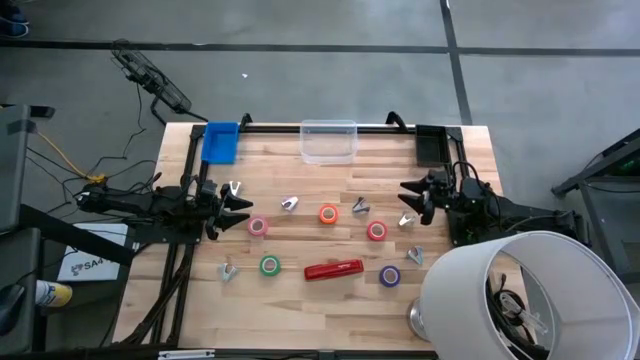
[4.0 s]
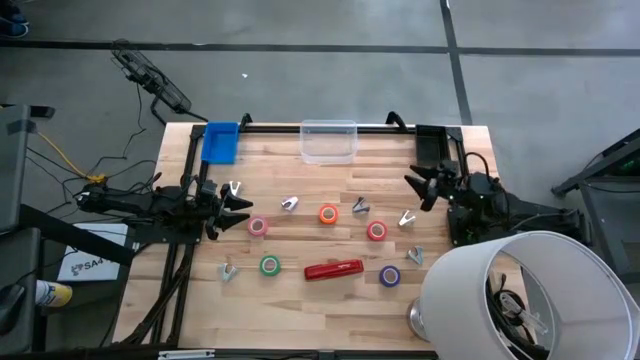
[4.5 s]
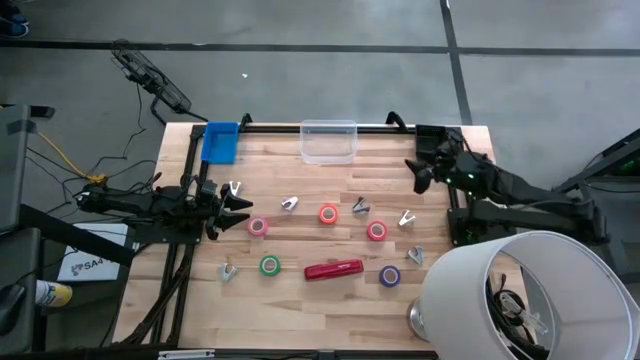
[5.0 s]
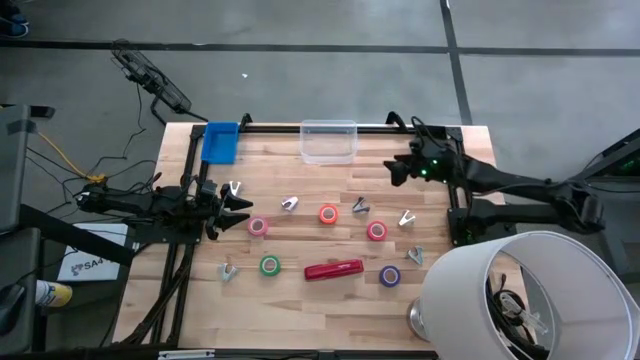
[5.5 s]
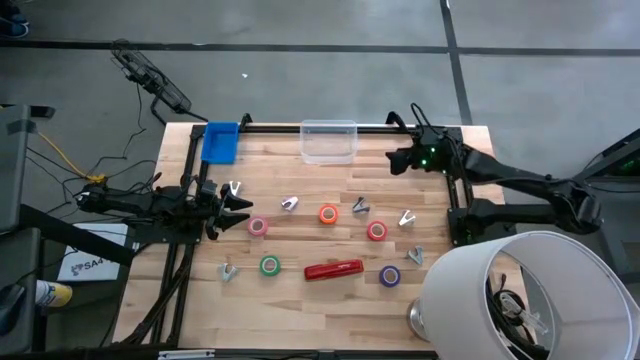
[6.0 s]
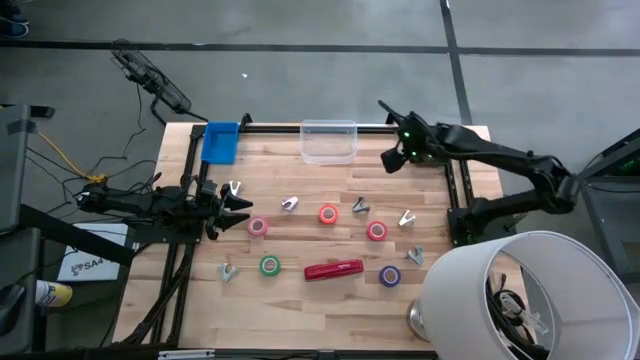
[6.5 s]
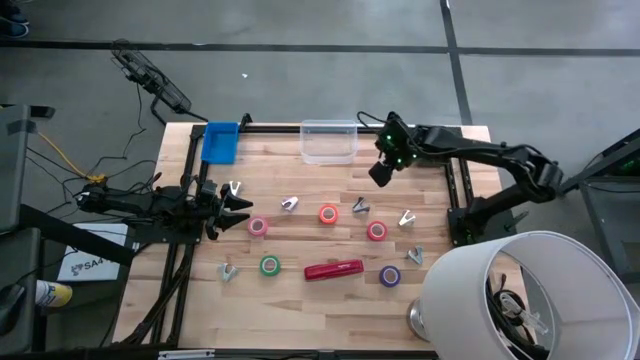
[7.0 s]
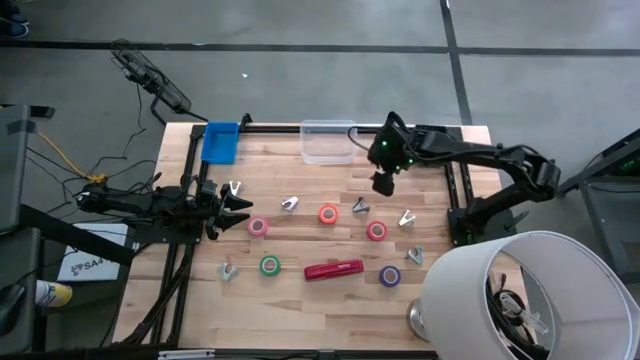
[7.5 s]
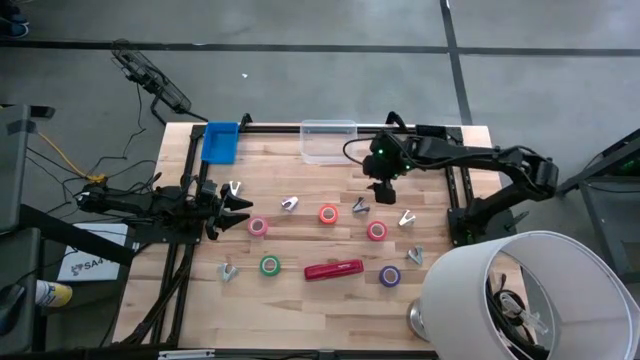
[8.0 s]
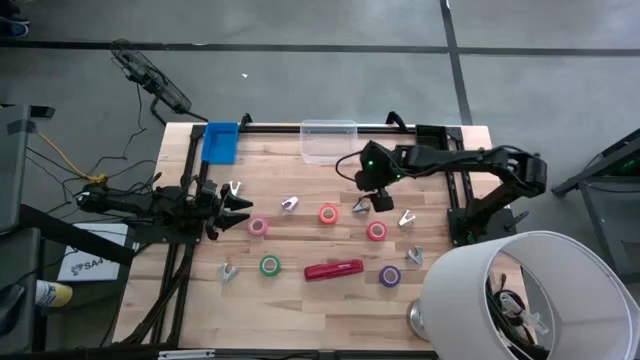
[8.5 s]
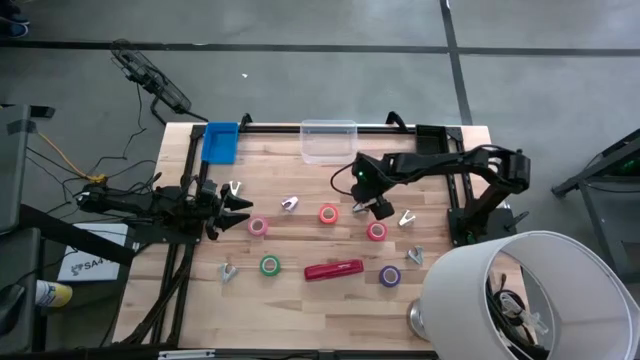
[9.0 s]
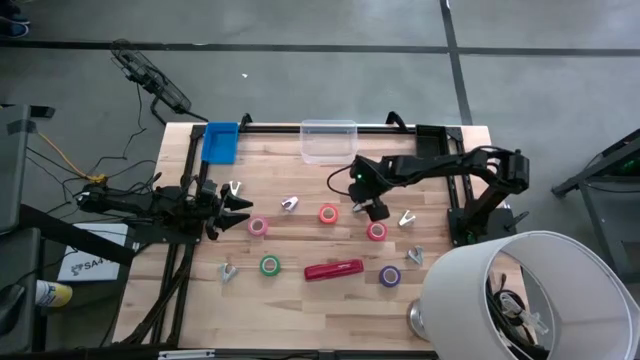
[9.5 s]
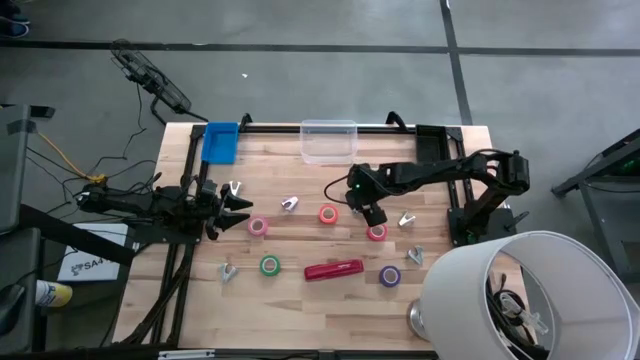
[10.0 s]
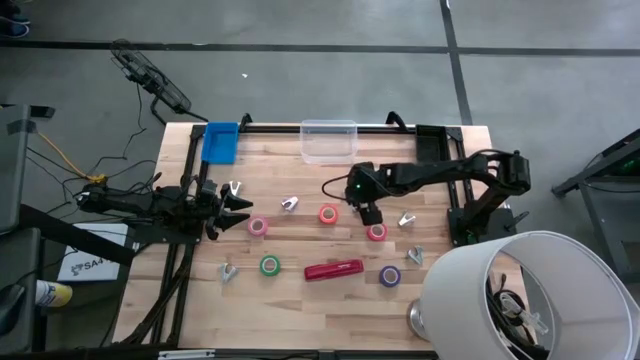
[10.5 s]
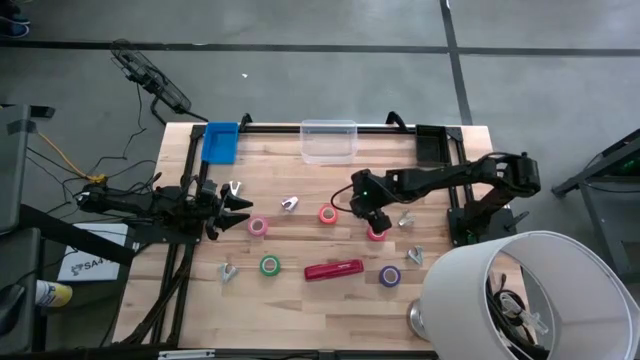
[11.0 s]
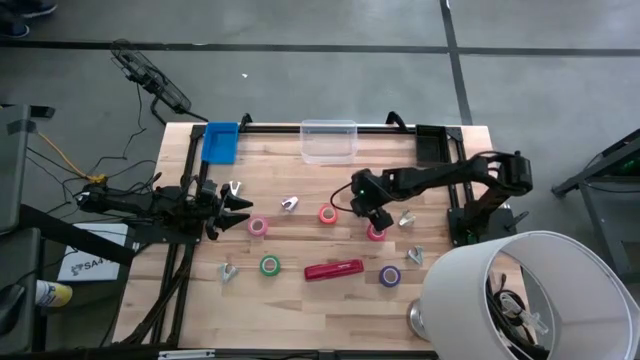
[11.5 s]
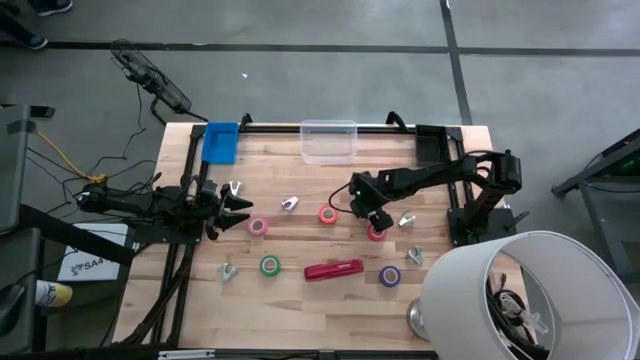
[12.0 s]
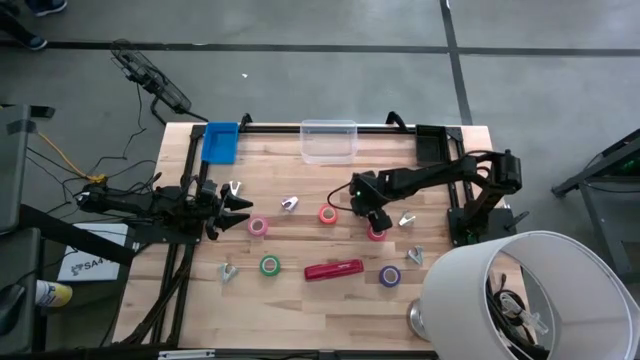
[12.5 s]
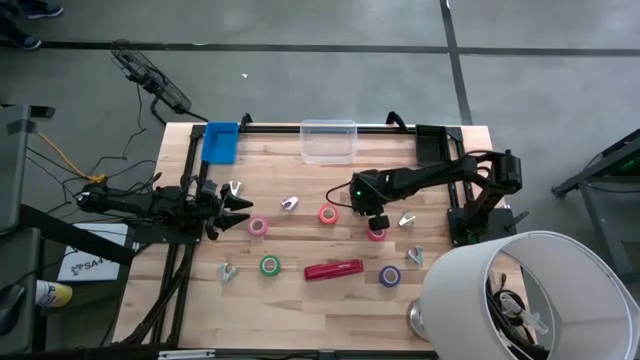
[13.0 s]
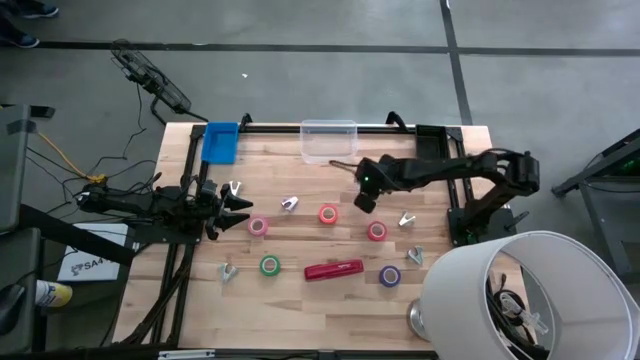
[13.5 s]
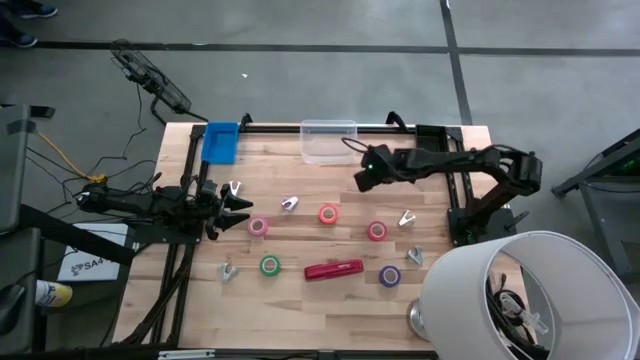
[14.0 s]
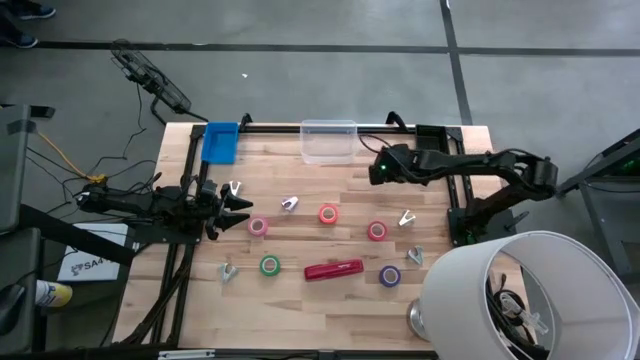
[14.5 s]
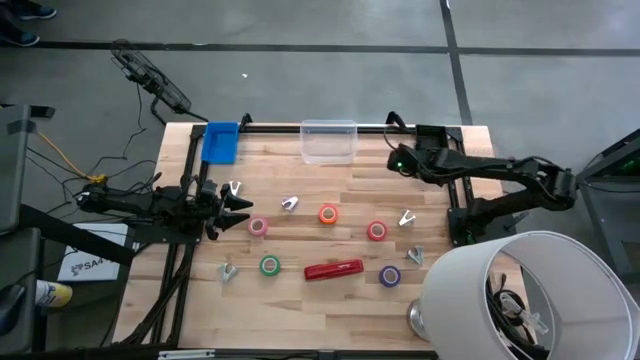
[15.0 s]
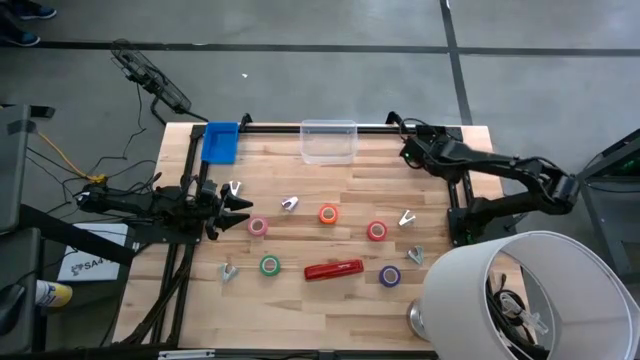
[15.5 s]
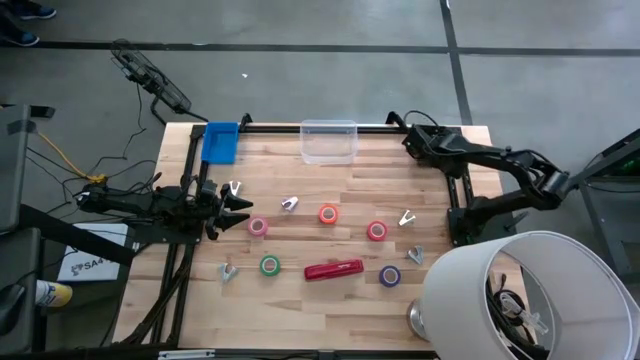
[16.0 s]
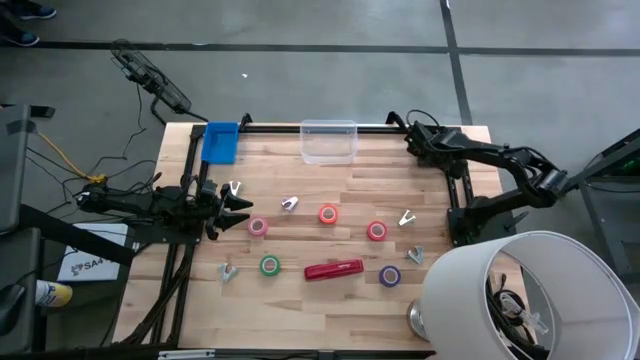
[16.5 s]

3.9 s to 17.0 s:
Task: Pick and place Stapler, Stapler remover, tape
Put the black staple remover into the black bin

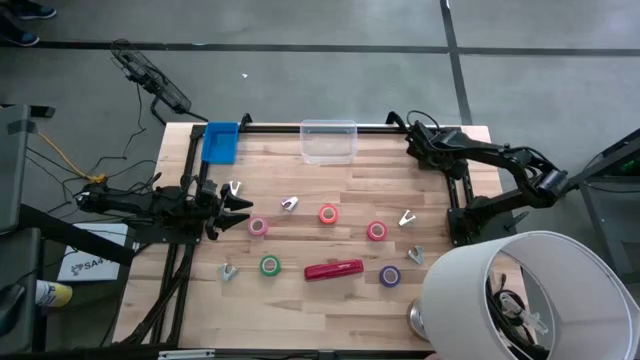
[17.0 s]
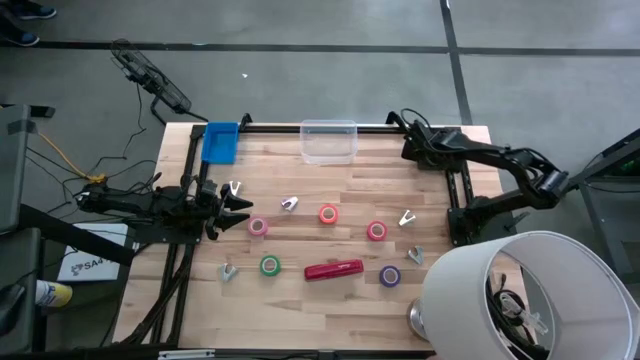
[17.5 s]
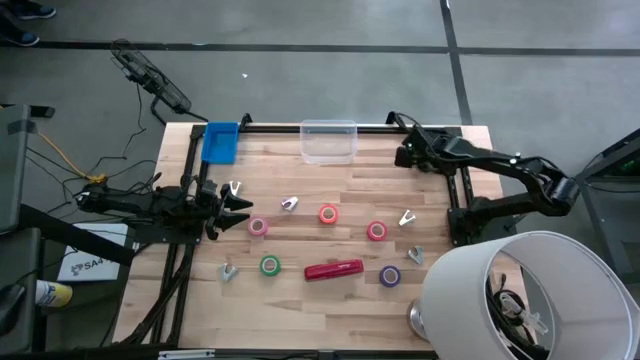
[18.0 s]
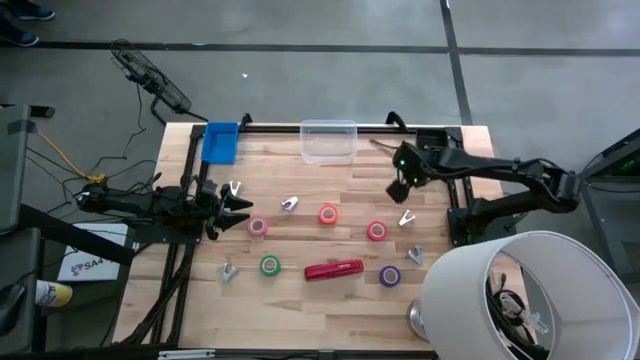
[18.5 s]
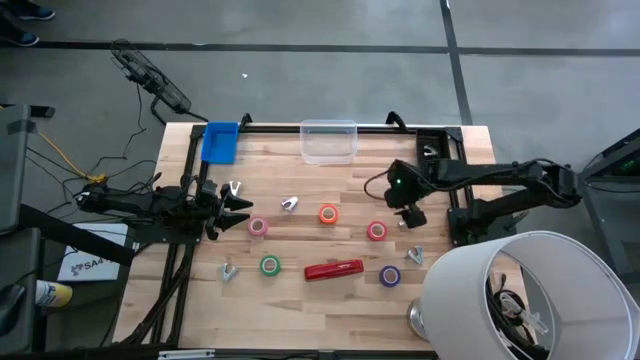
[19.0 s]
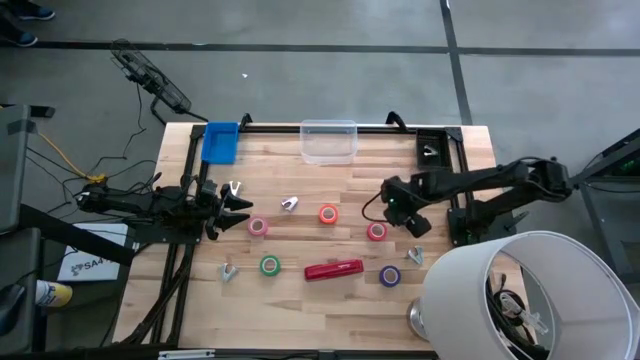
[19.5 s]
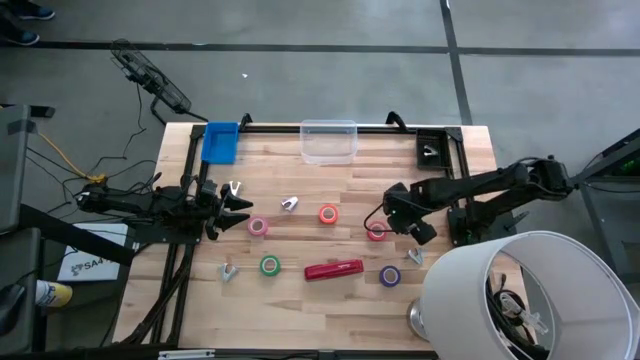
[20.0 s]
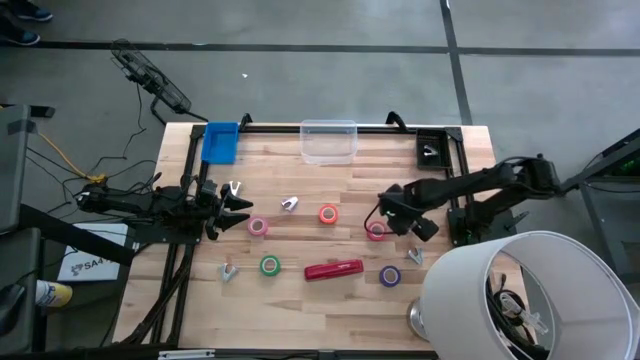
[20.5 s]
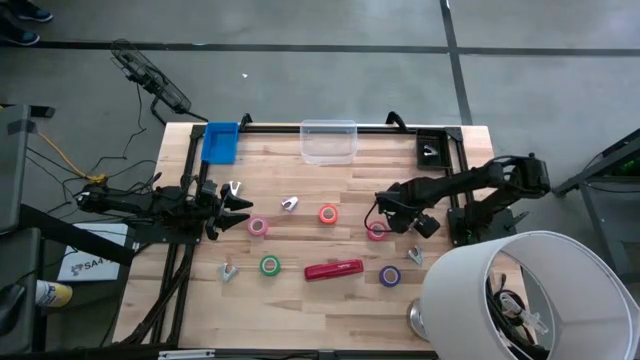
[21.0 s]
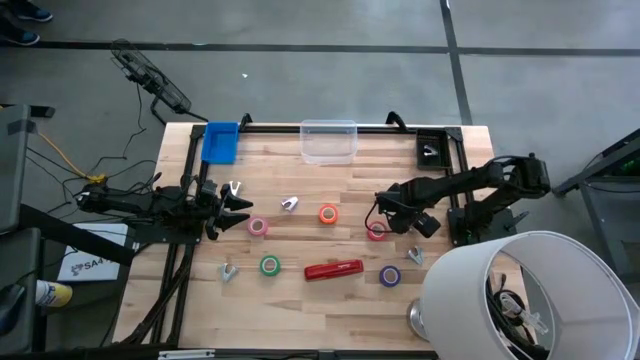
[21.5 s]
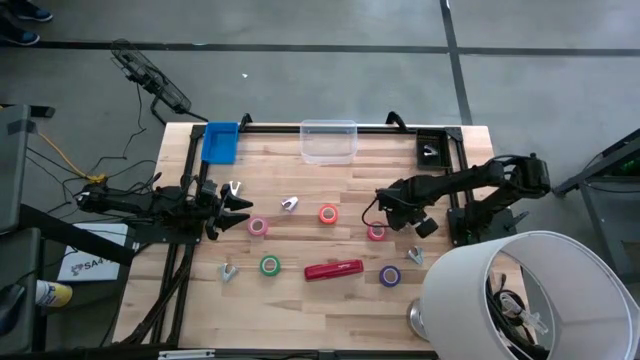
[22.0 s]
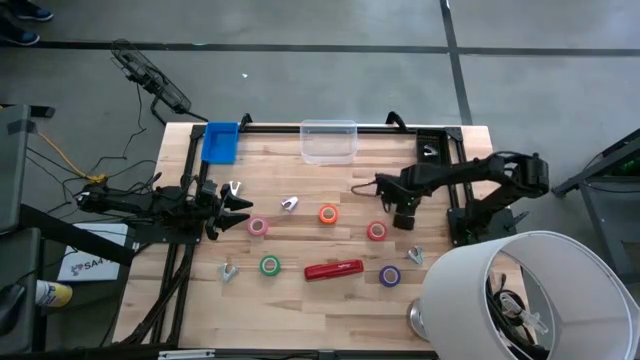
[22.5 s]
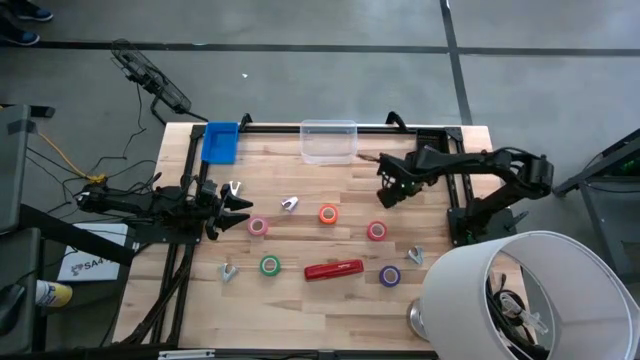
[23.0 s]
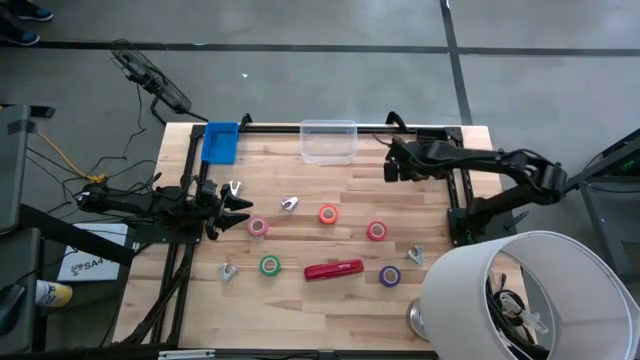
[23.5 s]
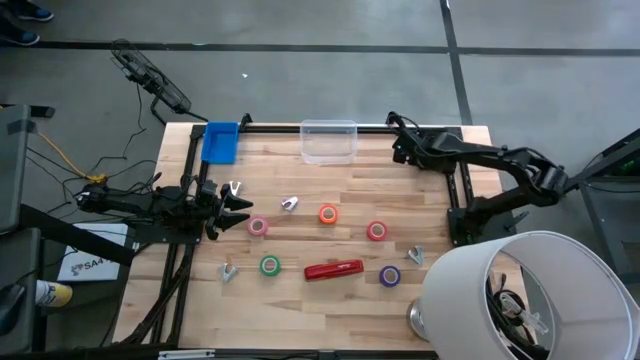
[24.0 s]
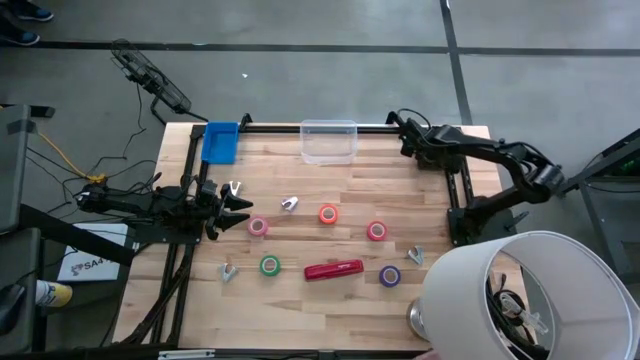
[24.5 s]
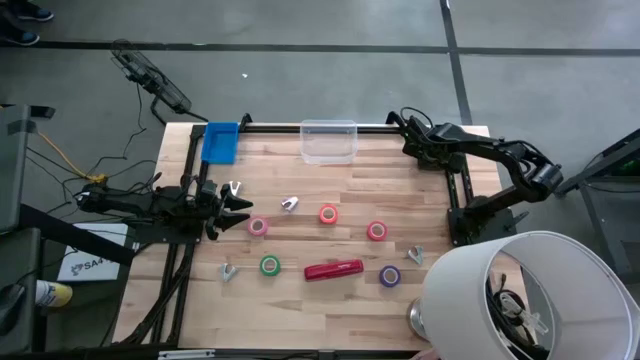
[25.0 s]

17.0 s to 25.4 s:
Put the right gray staple remover into the black bin

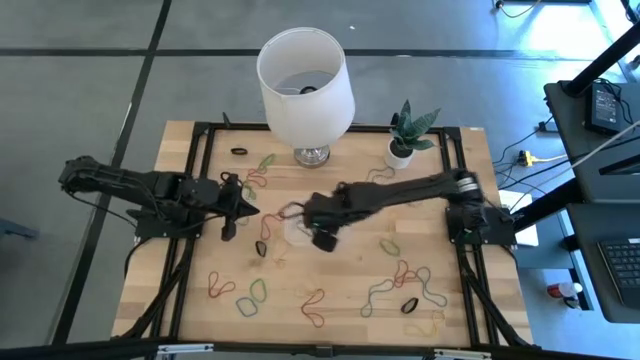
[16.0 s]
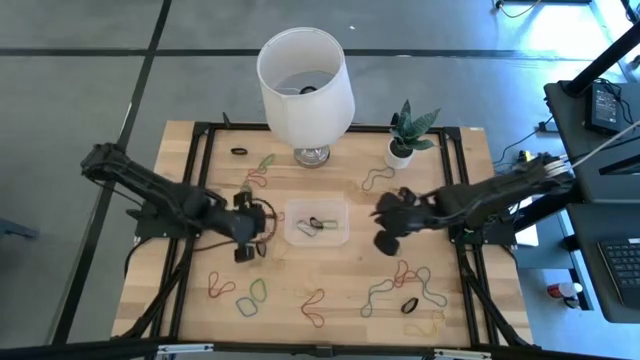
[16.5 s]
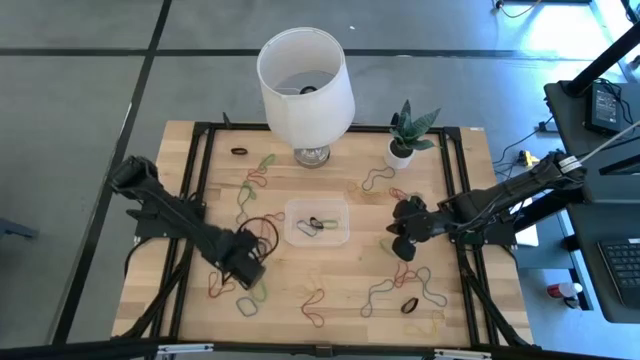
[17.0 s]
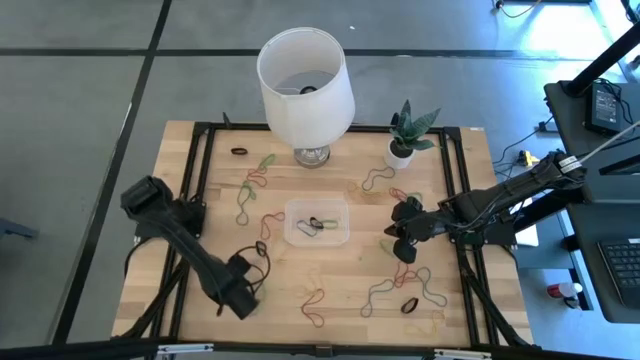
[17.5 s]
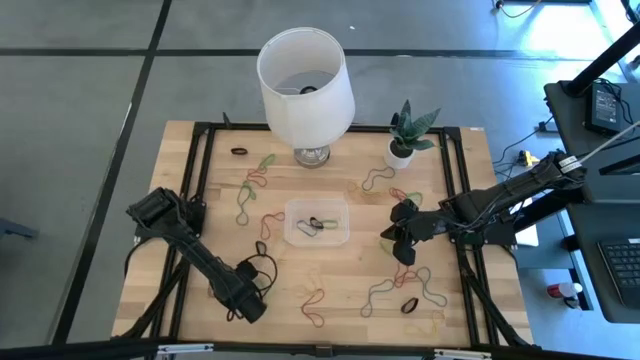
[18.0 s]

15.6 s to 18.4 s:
Task: Pick and place rubber bands into bin
Put the red rubber band into the transparent bin
